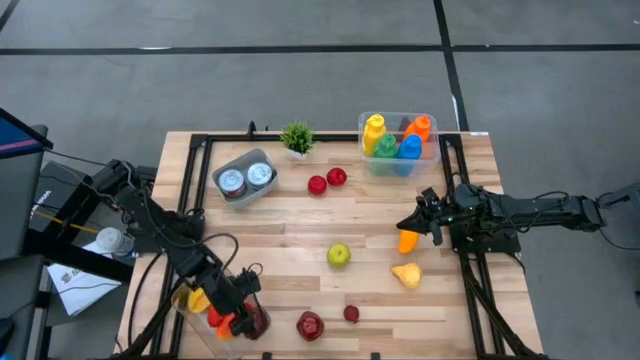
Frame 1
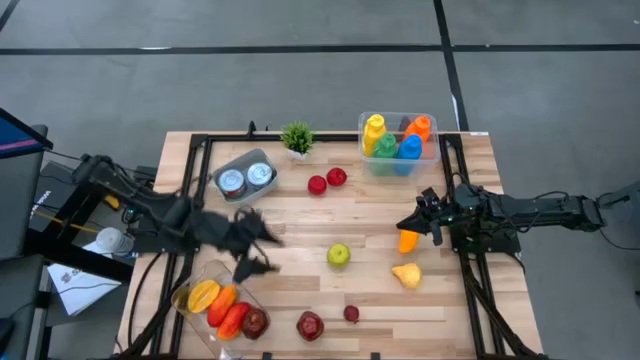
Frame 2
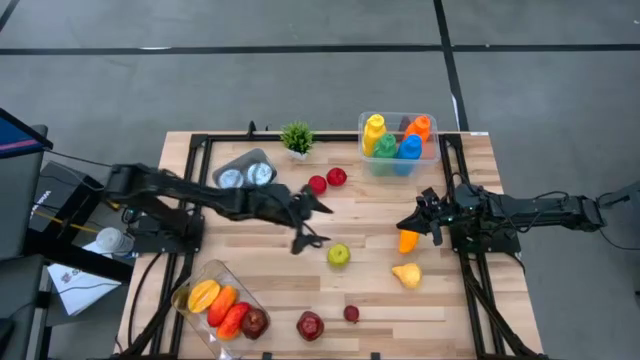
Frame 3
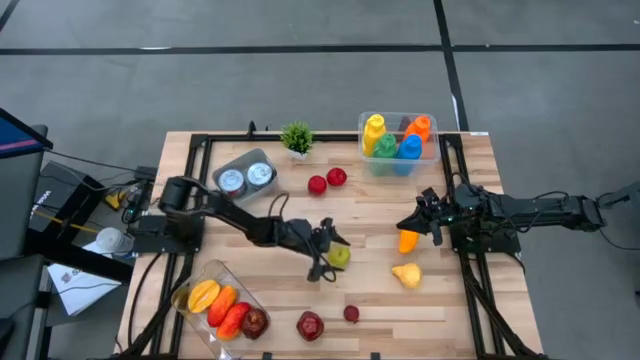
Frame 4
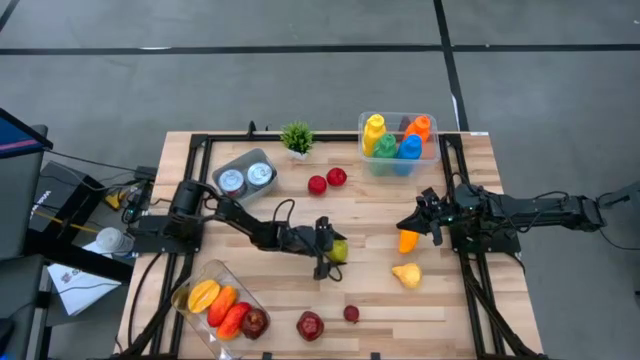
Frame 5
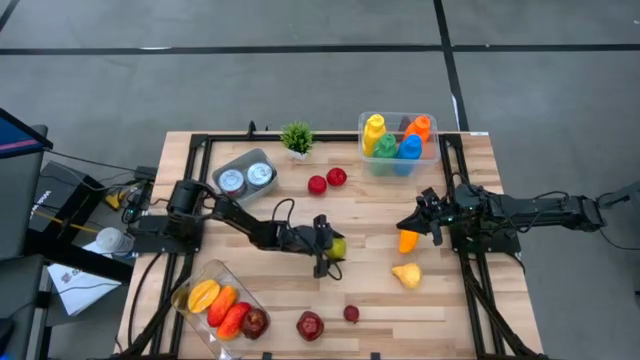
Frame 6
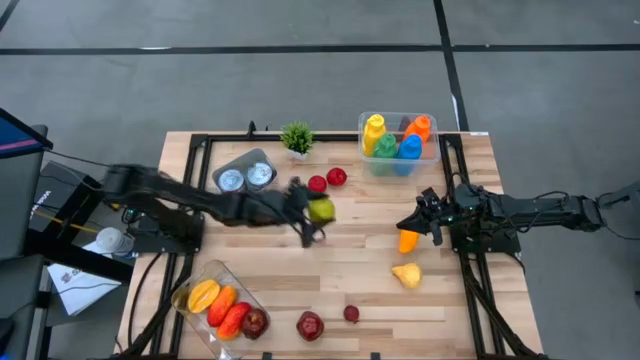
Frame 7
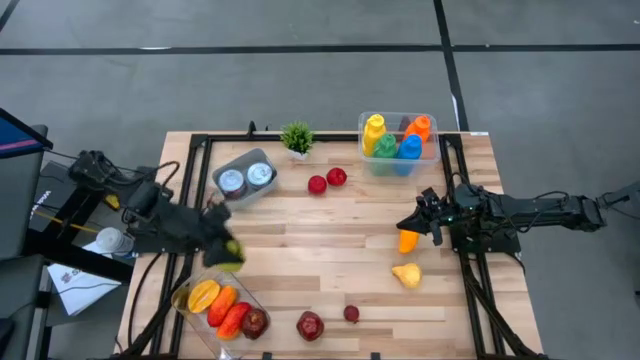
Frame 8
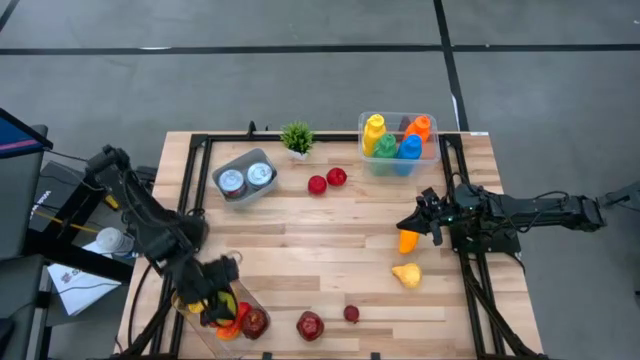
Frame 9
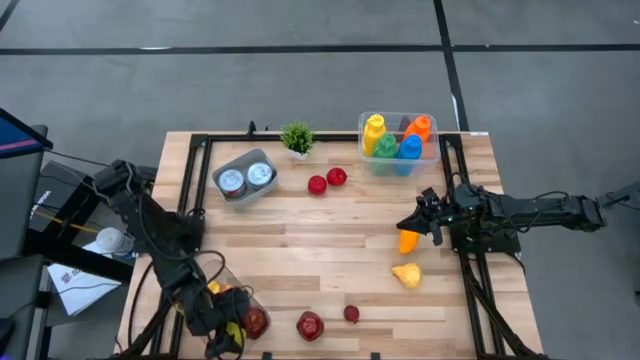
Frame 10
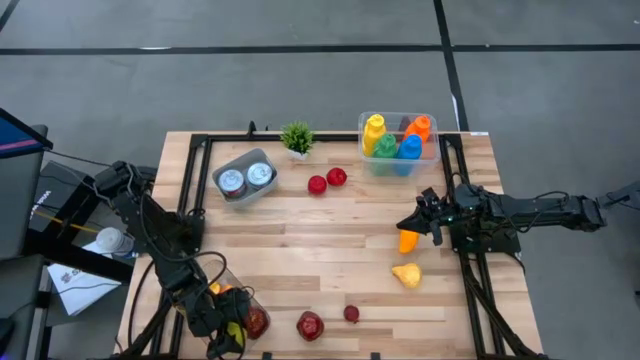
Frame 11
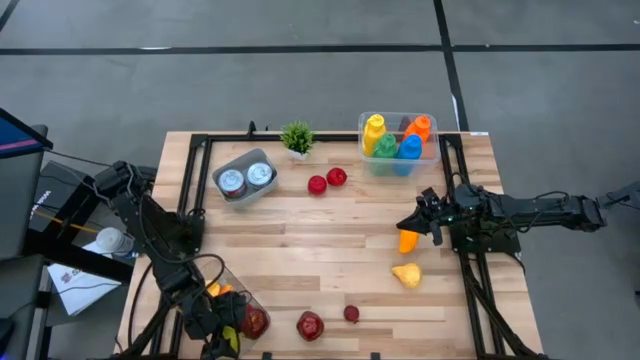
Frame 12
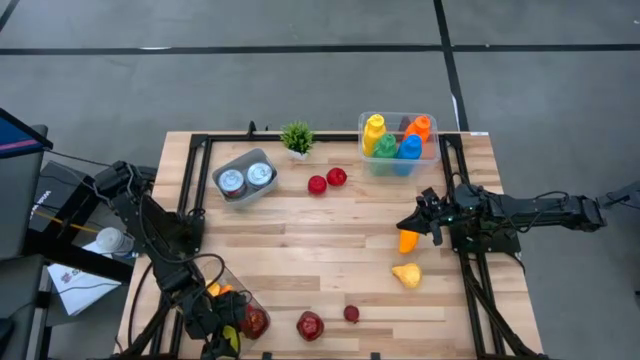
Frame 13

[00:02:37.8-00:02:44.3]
Task: Pick & Place Food Item
Put the green apple into the bottom transparent bin

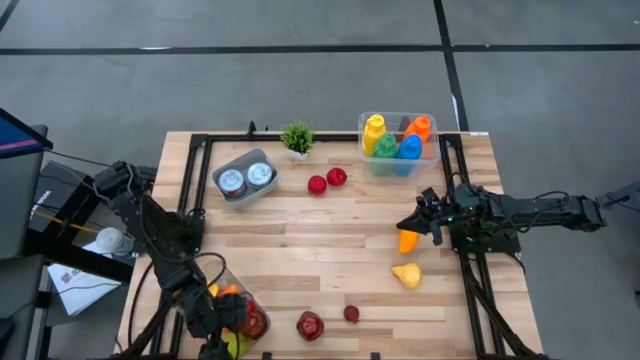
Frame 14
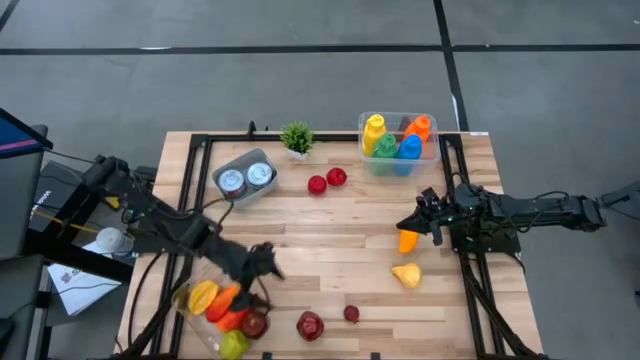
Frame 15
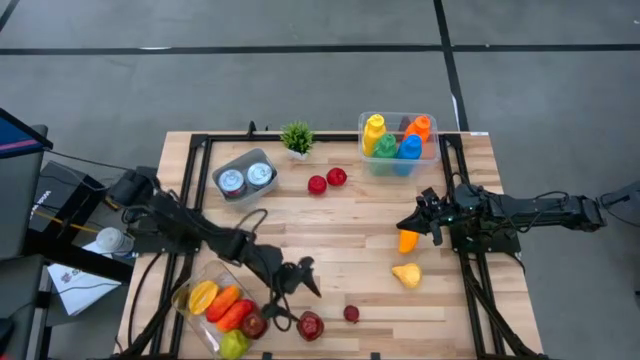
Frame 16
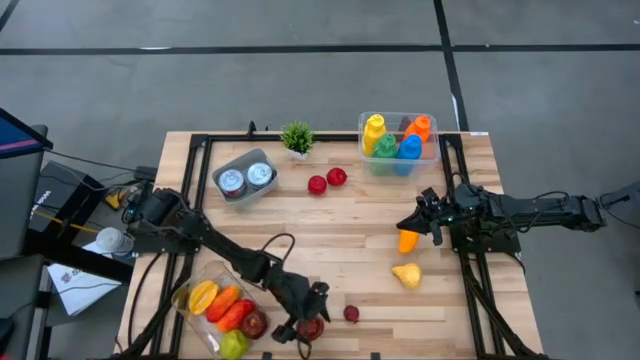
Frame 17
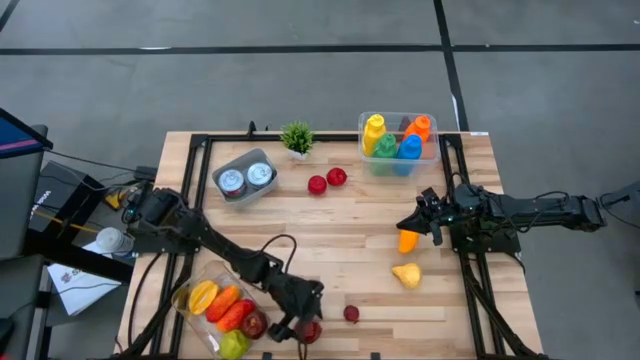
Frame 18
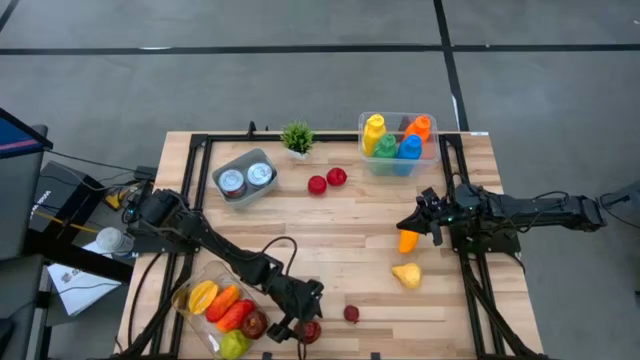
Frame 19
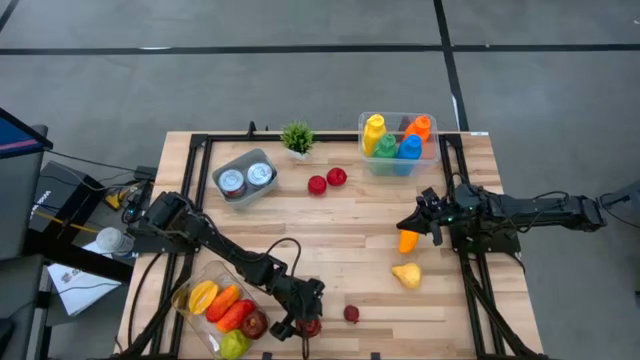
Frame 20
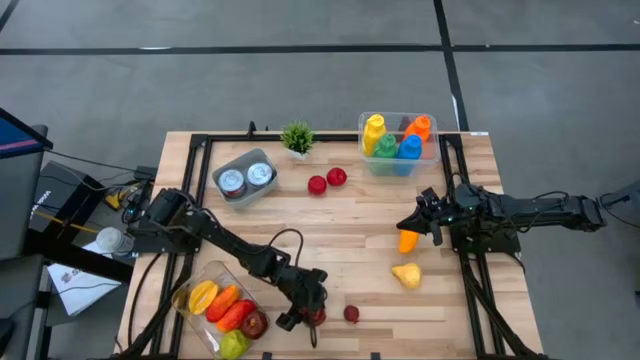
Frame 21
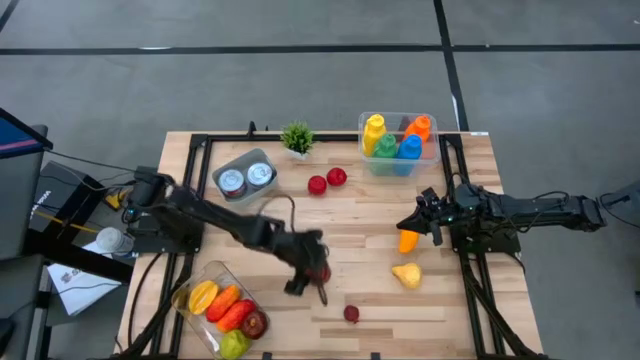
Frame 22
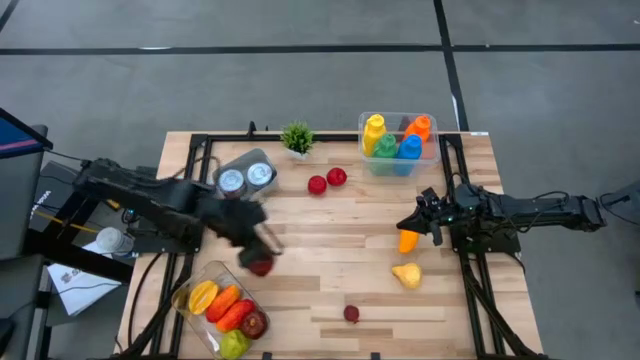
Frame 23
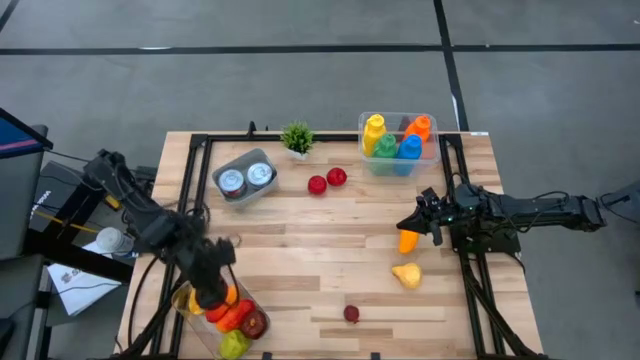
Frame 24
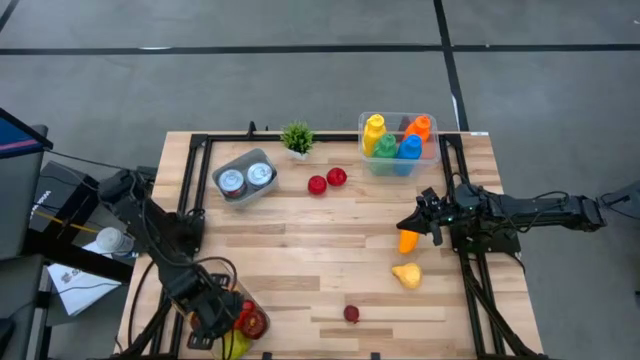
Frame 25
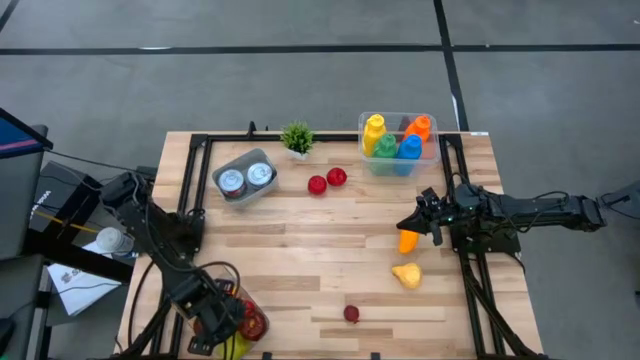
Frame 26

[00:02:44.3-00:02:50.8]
Put the dark red apple into the bottom transparent bin

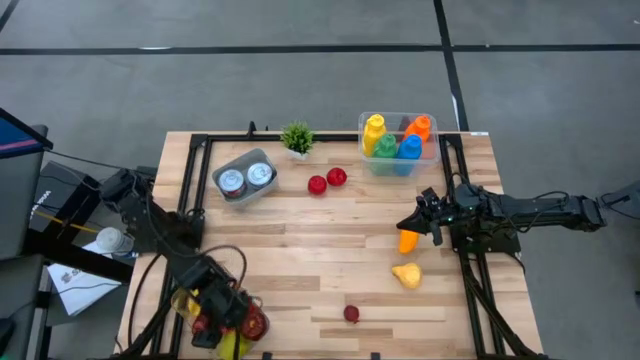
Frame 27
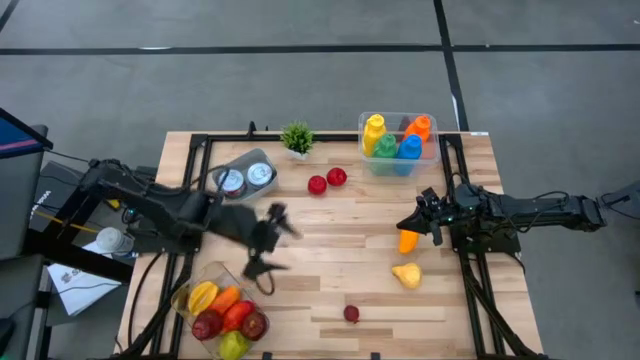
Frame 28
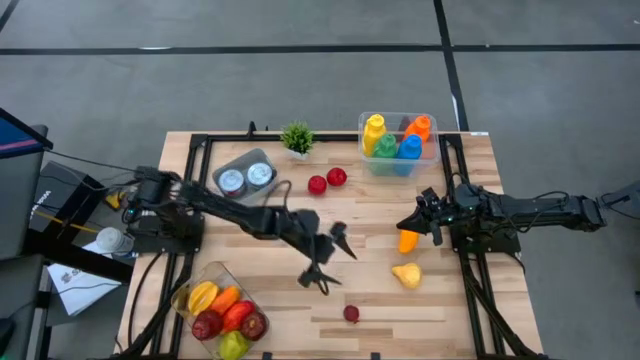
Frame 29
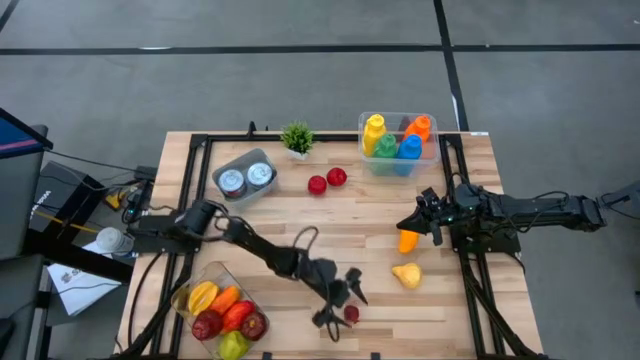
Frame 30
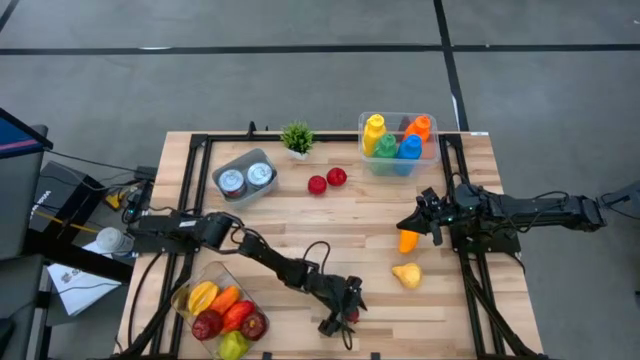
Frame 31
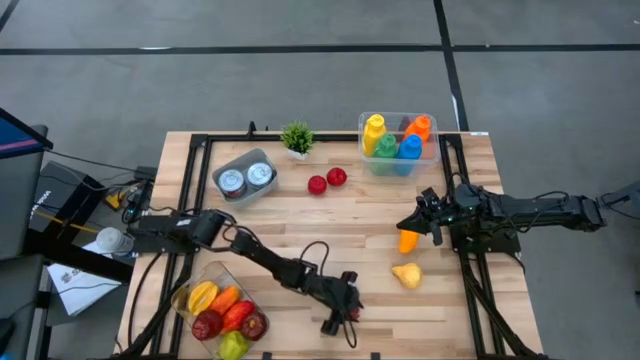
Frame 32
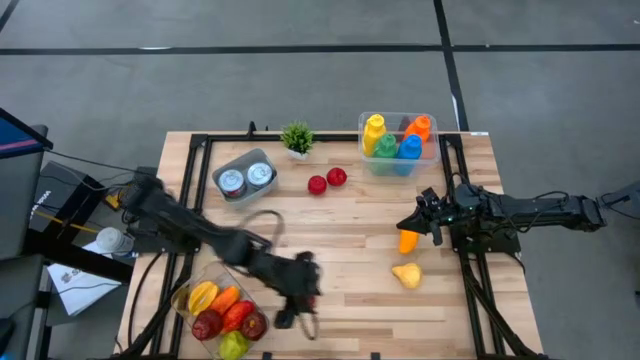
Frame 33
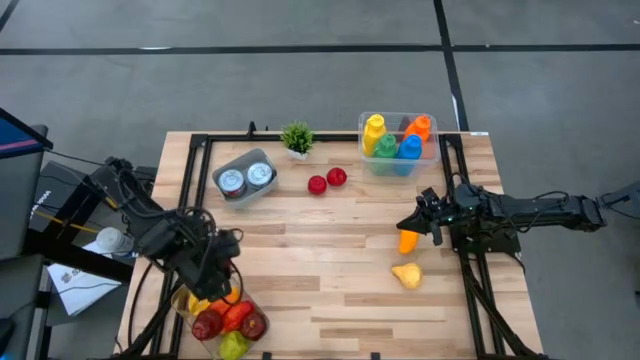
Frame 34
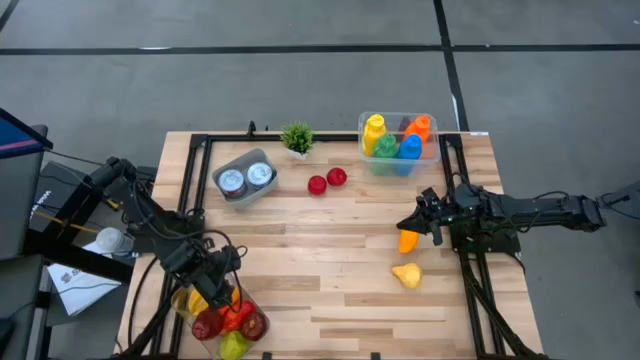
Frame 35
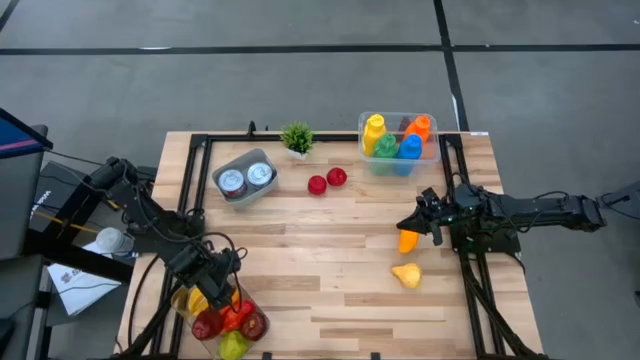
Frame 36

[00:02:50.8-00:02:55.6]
Put the red pomegranate into the bottom transparent bin

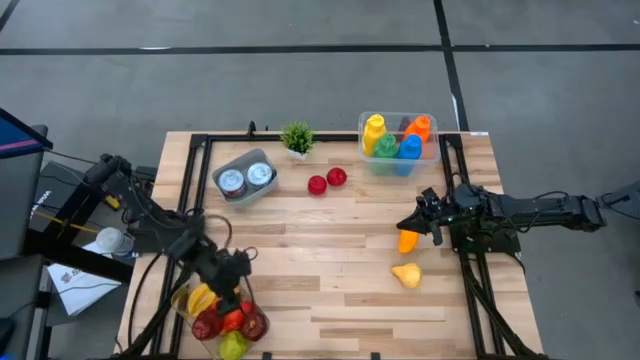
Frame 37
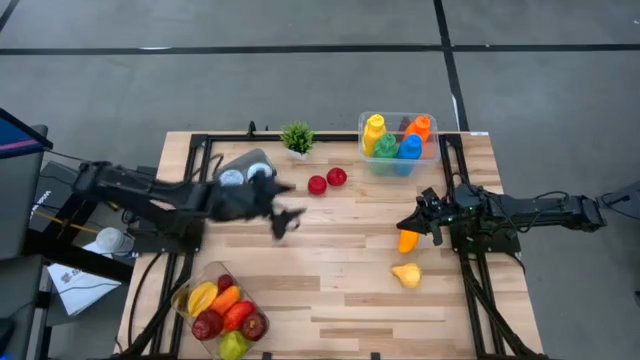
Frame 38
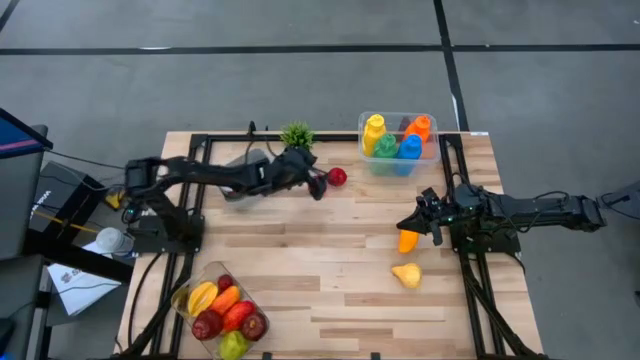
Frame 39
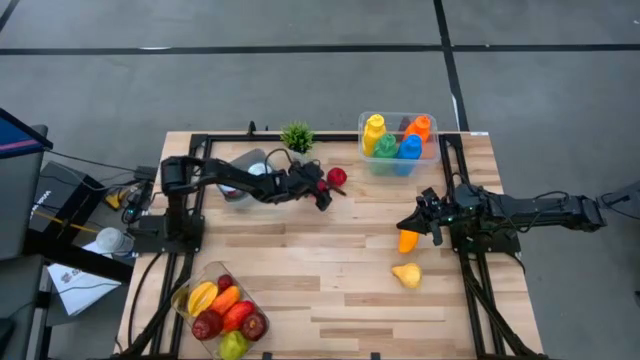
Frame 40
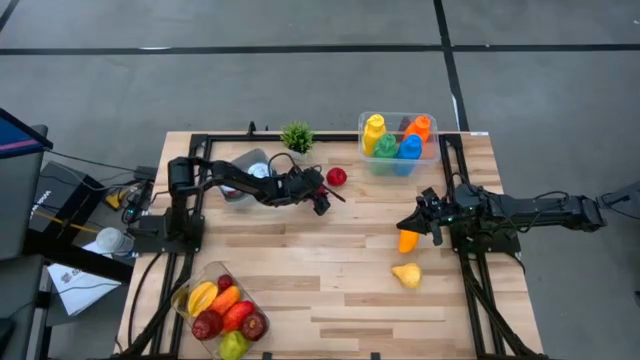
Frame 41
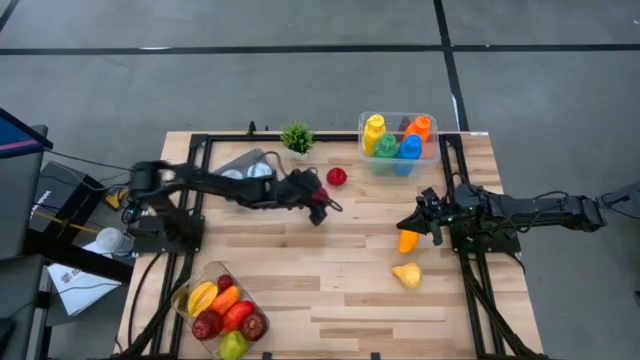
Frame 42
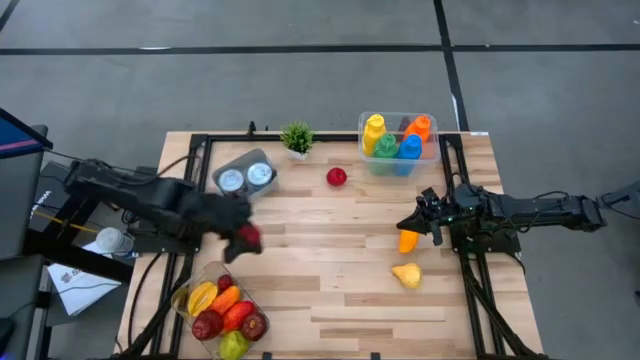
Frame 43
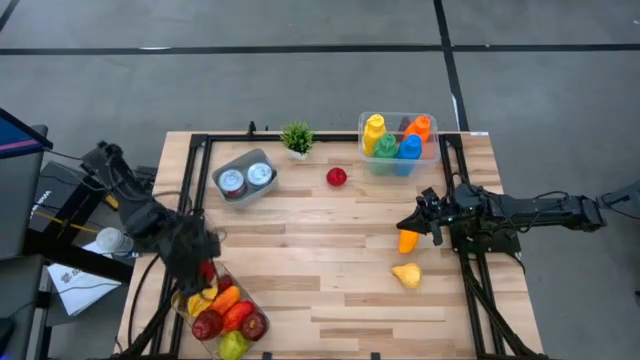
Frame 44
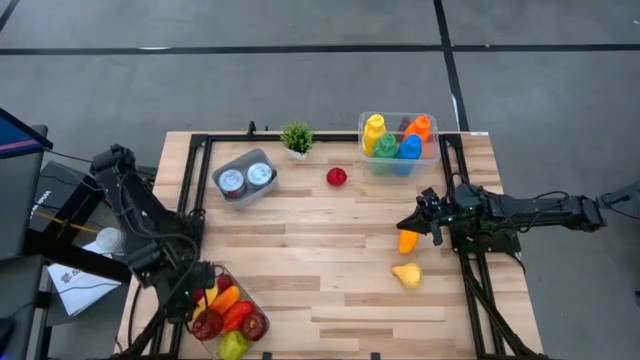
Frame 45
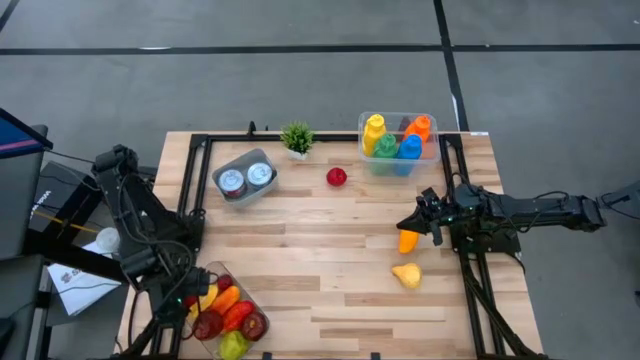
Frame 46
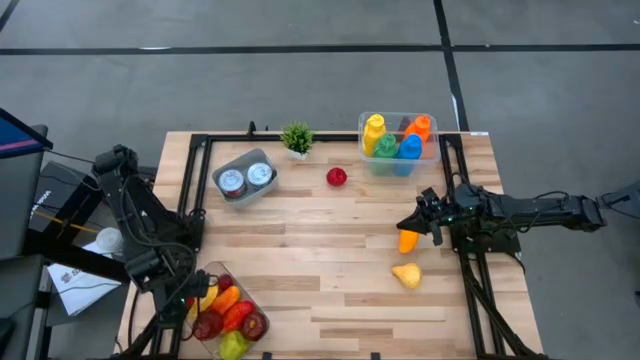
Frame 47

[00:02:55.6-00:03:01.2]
Put the left red apple into the bottom transparent bin
